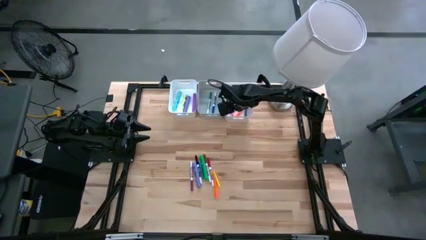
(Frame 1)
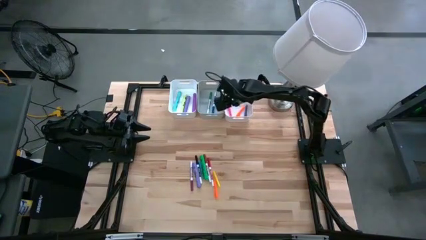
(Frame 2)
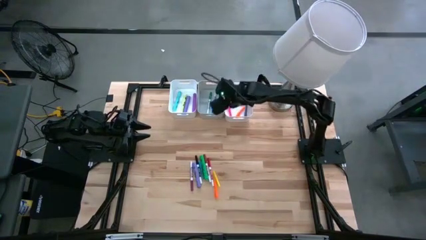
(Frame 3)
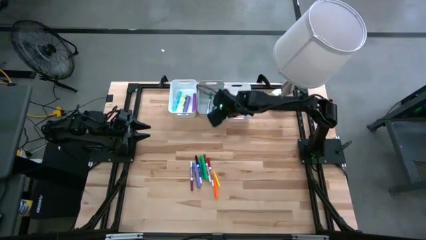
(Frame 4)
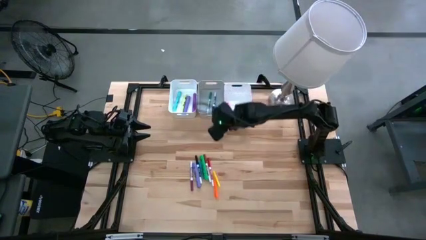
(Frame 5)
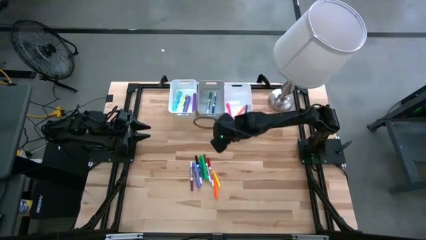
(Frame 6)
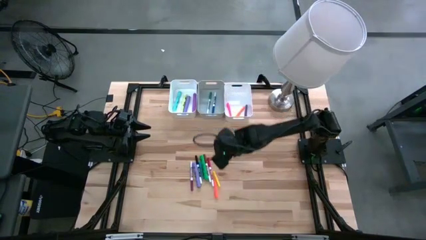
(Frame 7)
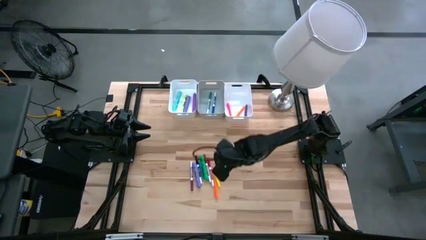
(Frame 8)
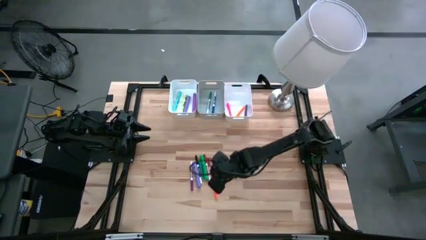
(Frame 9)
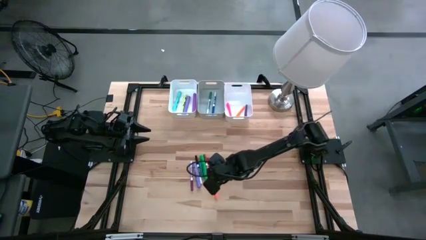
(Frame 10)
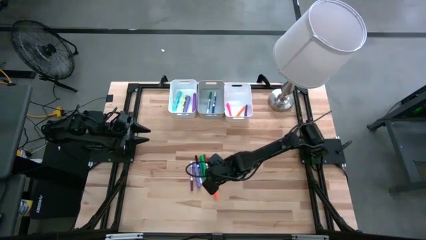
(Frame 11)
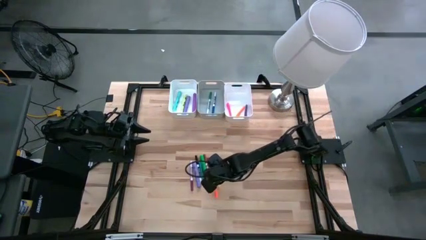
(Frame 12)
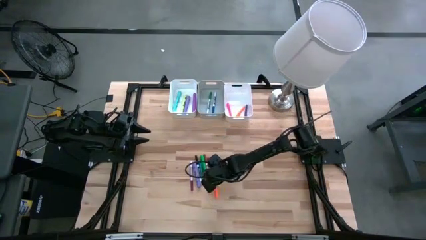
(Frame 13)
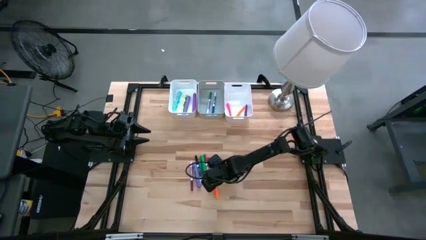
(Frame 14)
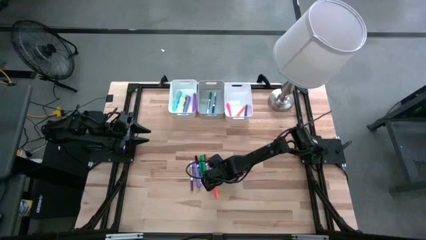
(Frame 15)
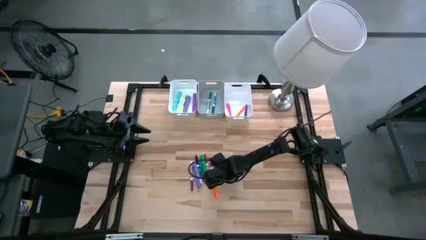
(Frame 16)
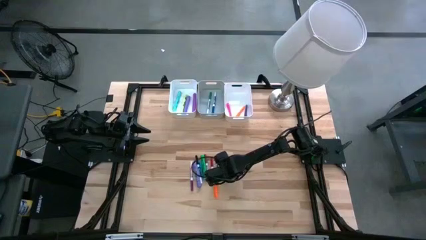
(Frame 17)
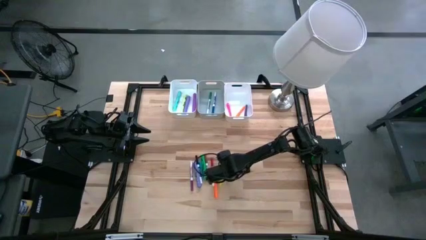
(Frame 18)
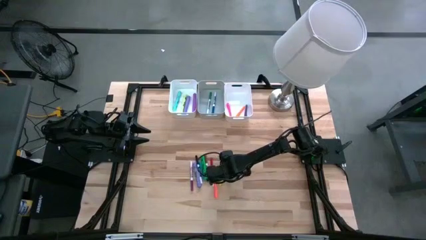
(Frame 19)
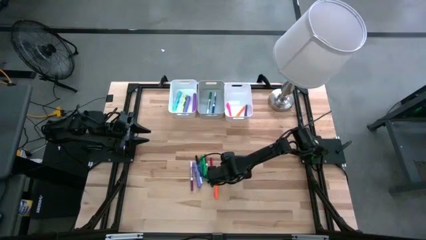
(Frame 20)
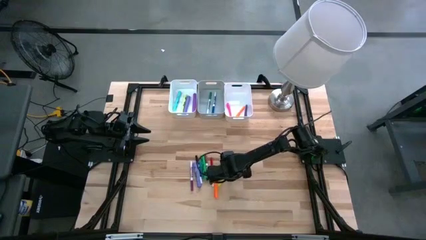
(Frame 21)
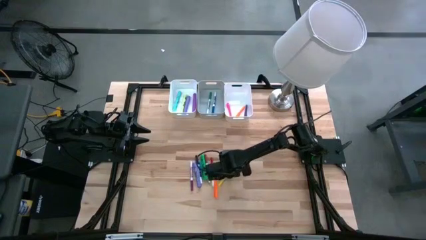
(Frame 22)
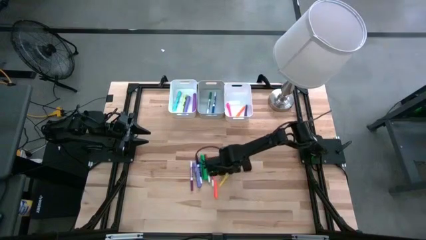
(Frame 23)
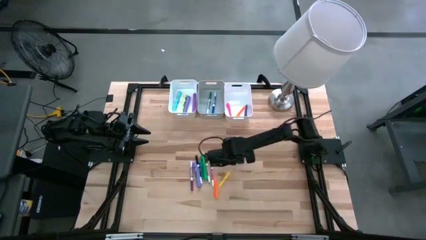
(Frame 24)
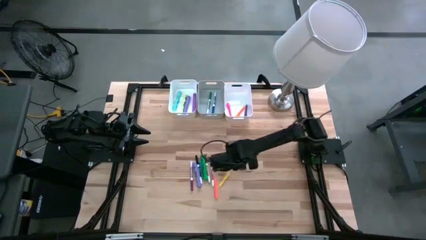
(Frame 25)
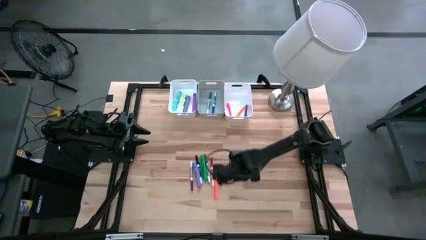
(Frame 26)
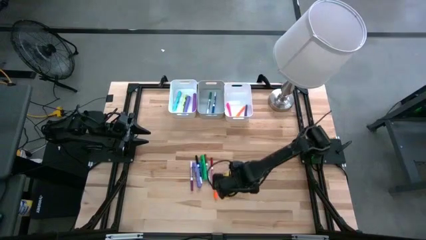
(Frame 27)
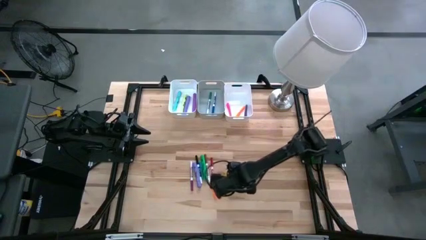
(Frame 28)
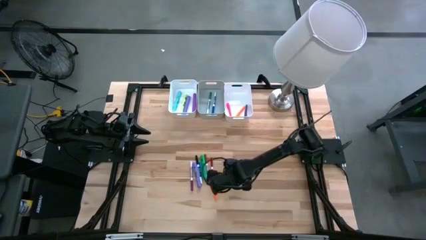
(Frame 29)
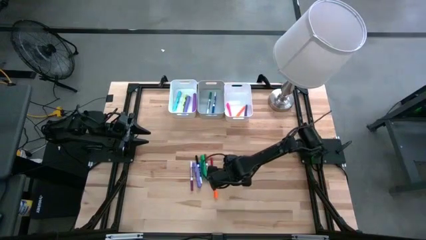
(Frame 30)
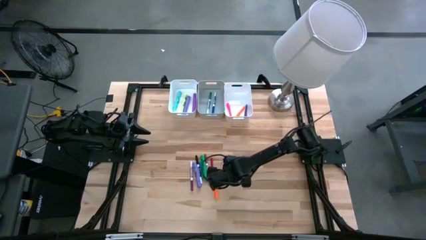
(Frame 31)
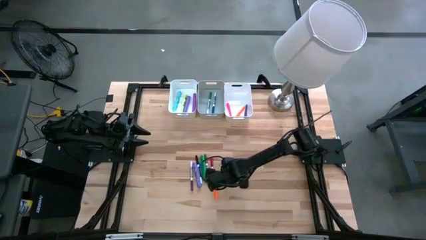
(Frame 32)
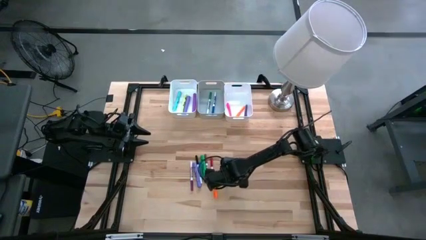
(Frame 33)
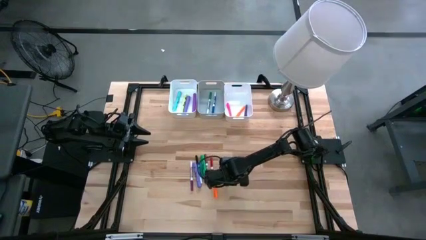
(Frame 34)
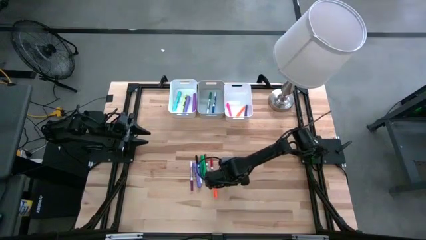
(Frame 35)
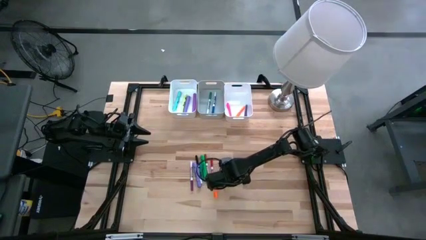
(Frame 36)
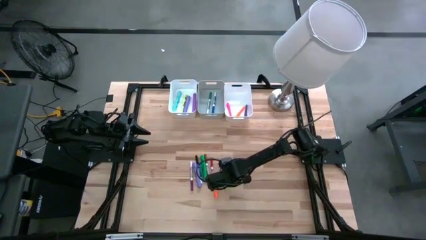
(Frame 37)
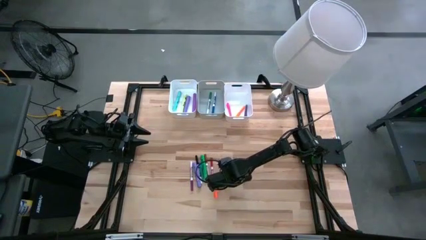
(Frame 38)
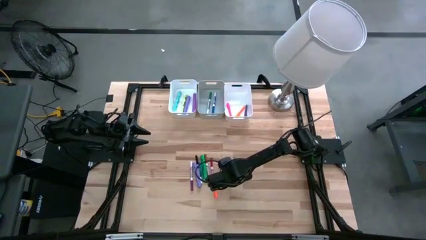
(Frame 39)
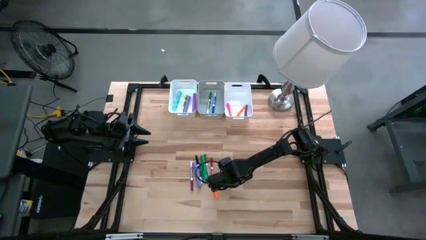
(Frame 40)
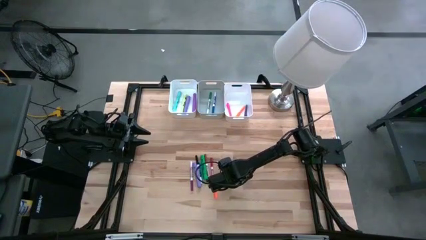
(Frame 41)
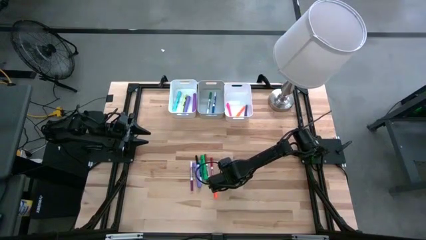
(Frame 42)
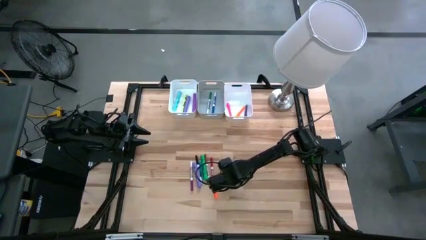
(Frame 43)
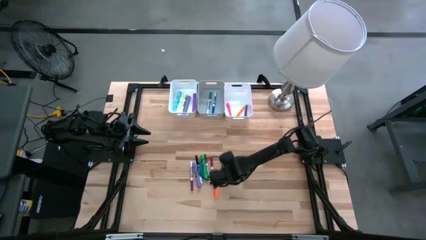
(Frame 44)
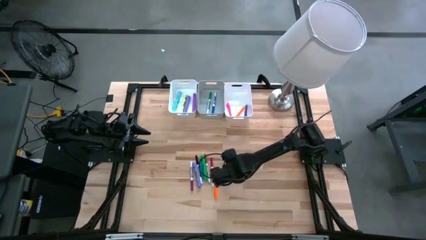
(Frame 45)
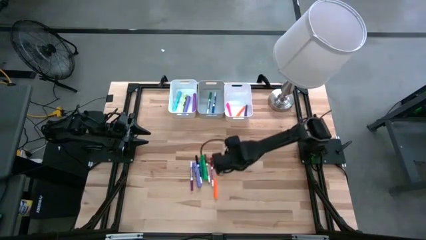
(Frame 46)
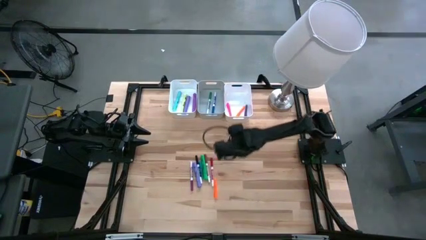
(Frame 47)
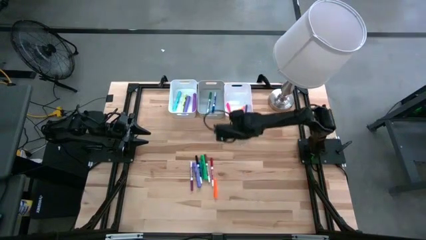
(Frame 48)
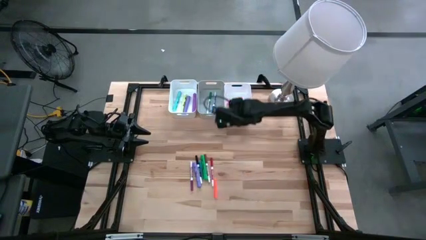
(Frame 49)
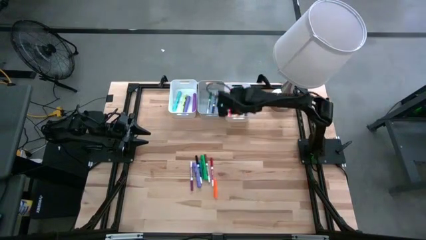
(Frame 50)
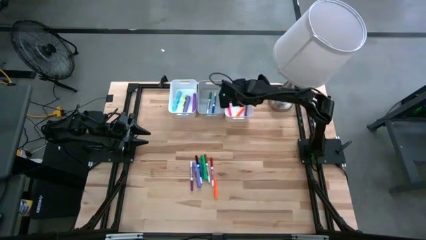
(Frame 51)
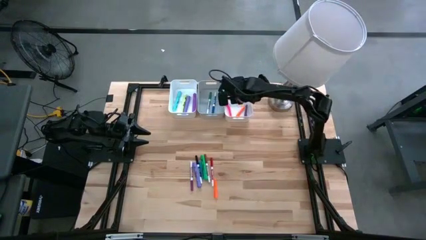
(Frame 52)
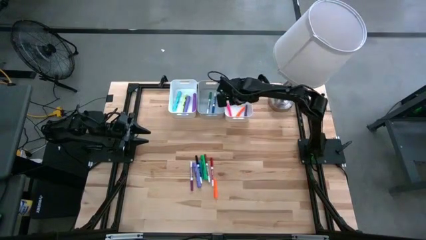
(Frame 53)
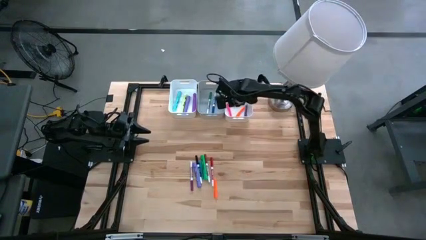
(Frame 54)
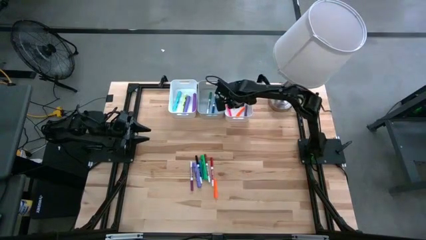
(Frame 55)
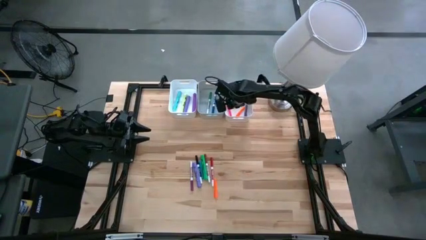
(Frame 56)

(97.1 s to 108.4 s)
Task: Pick & Place Markers
Put the yellow pen into the right white bin

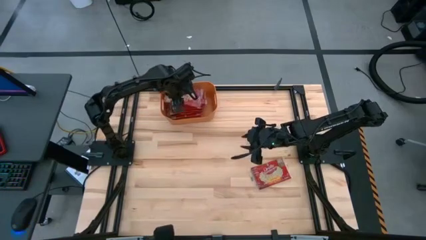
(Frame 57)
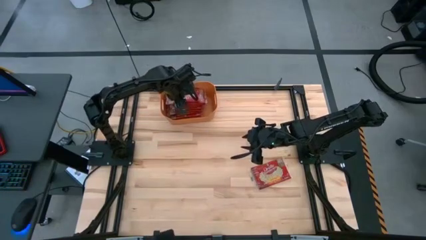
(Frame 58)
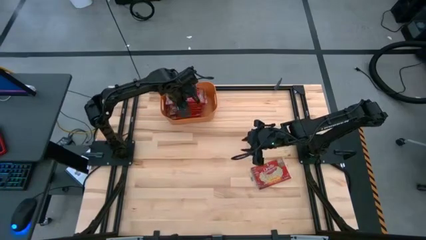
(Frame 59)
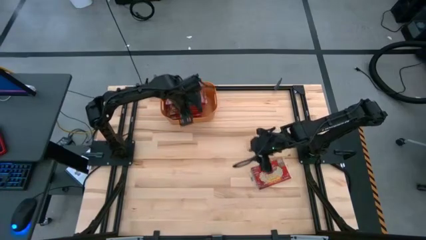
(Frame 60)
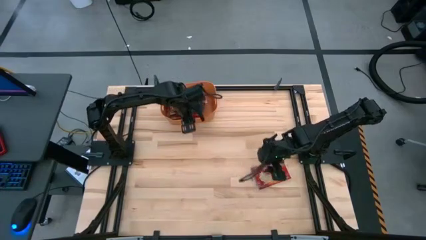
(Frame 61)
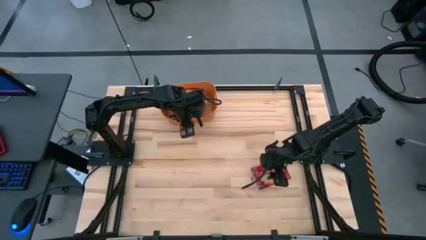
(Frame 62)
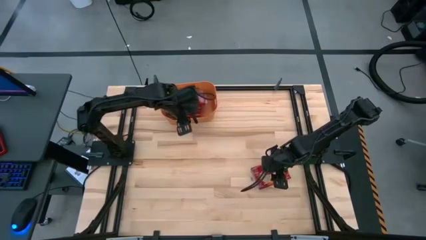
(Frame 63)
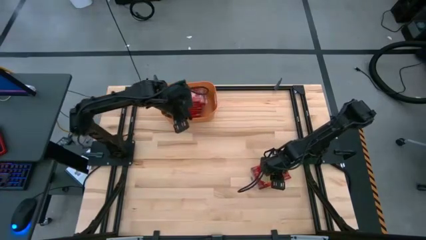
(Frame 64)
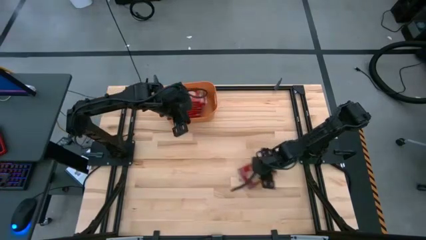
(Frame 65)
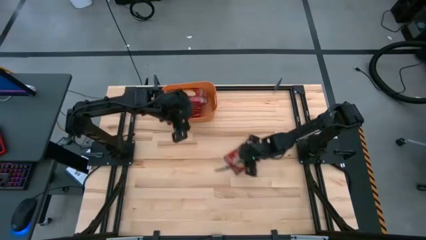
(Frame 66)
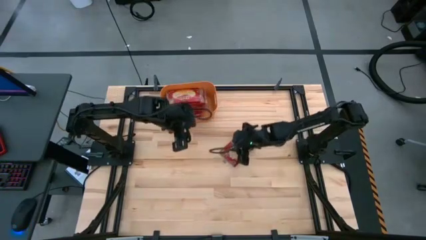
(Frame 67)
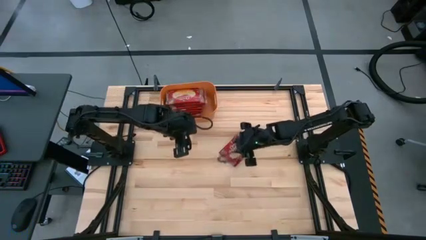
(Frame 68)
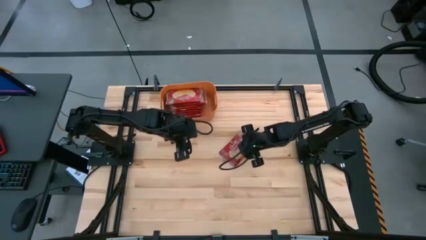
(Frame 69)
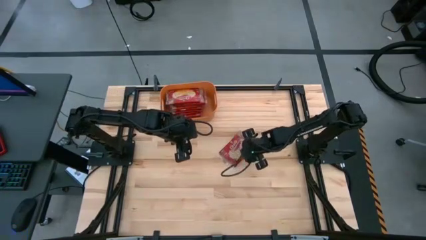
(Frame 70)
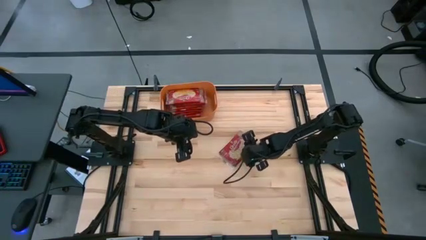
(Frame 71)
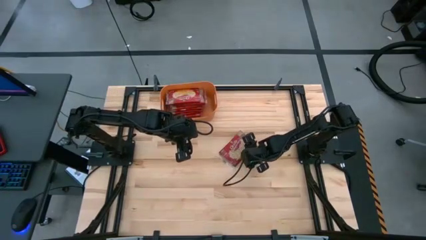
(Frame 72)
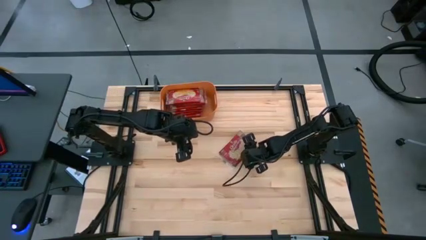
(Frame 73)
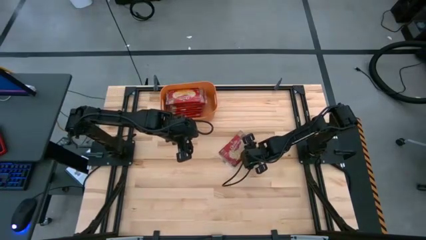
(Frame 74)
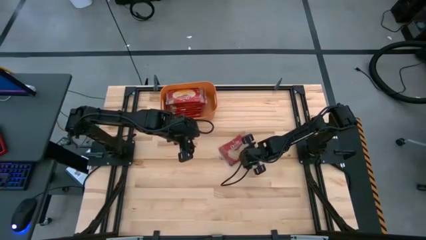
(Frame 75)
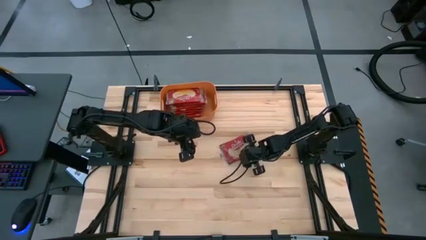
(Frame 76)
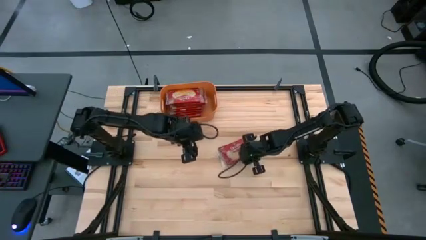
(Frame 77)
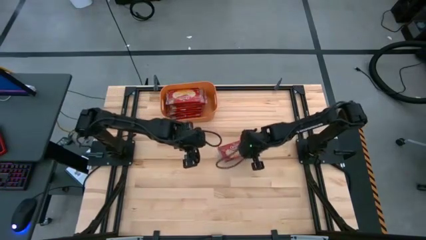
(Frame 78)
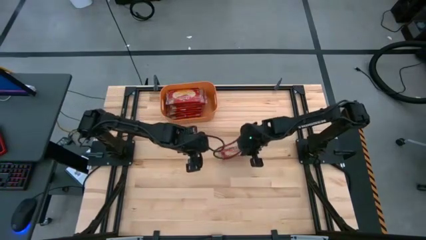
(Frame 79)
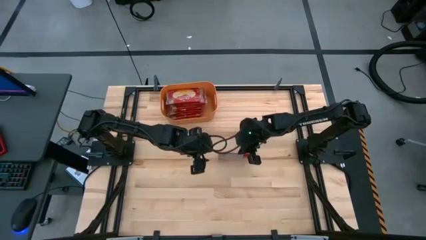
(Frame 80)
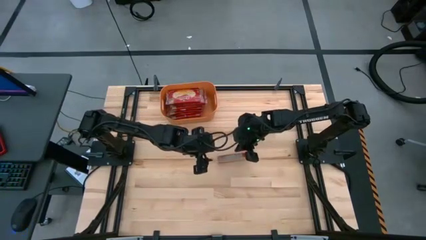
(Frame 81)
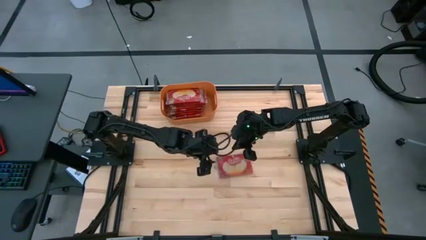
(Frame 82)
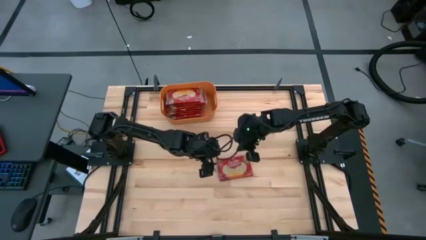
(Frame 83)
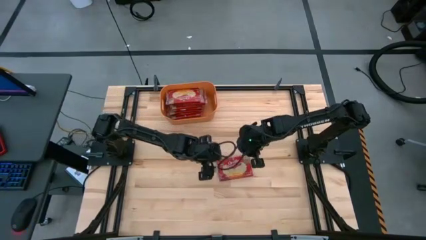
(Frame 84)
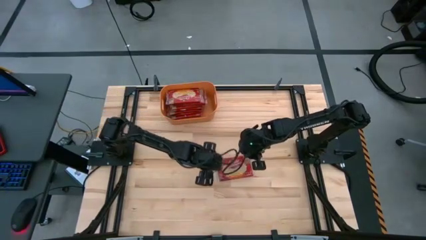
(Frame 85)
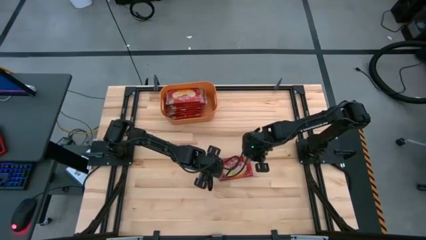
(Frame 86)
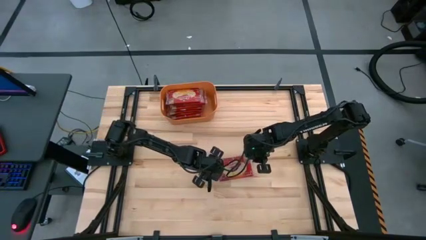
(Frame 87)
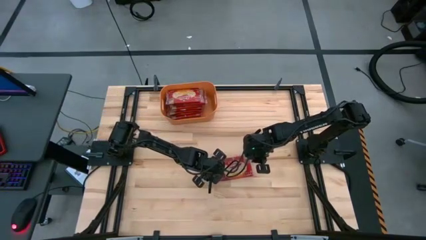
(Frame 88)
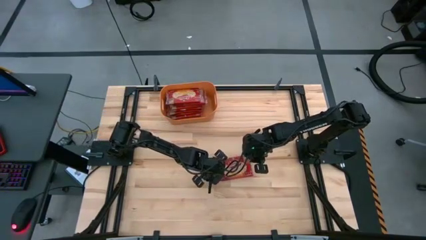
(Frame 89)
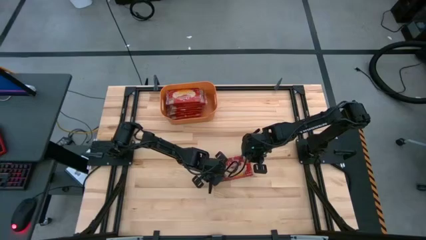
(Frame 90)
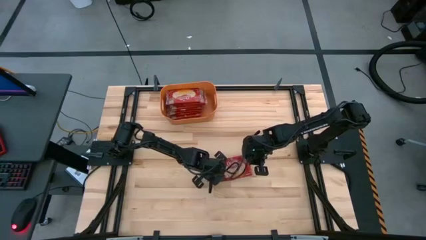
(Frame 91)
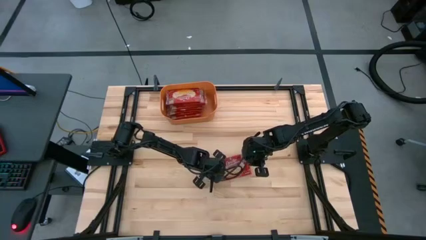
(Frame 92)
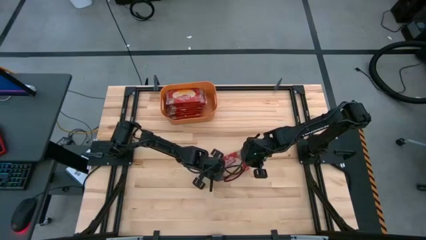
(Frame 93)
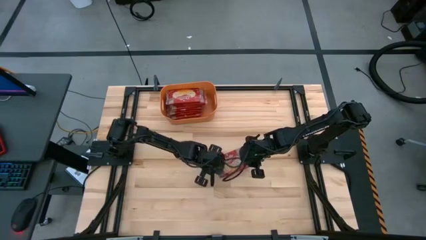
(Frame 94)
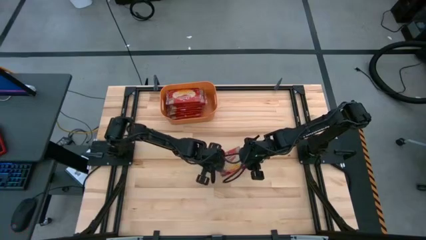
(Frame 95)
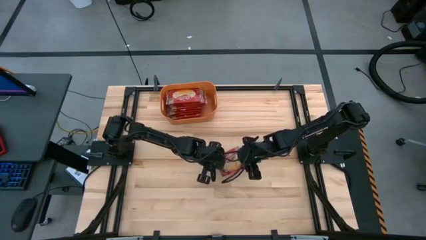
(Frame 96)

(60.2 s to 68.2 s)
Task: Sort popcorn bags into baskets
Put the red popcorn bag into the orange bin
